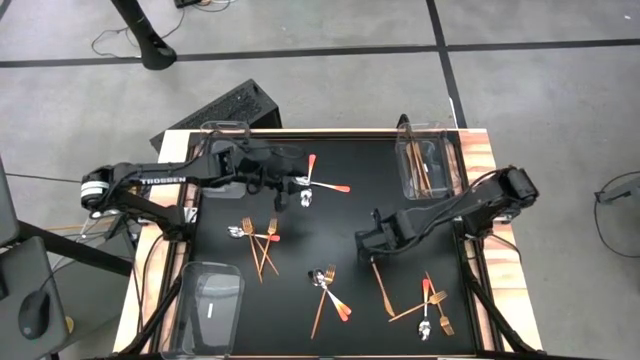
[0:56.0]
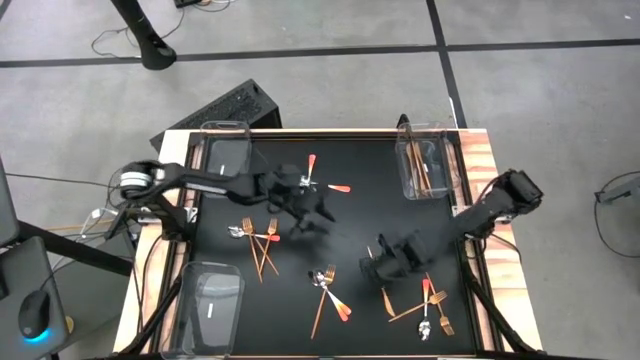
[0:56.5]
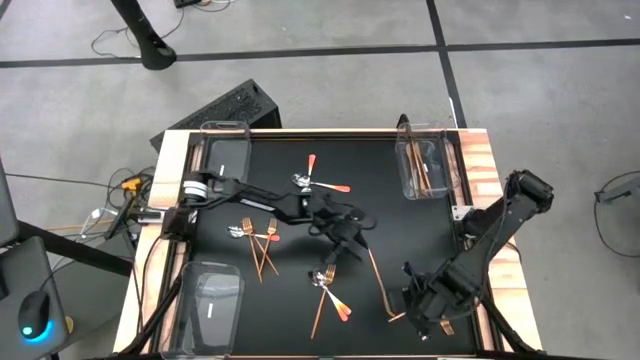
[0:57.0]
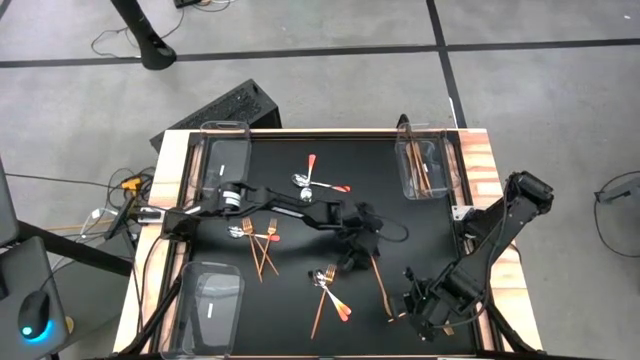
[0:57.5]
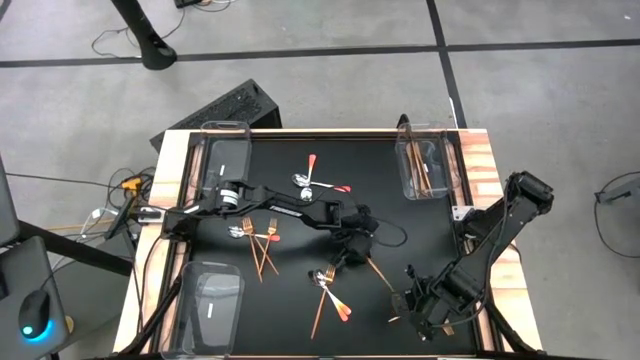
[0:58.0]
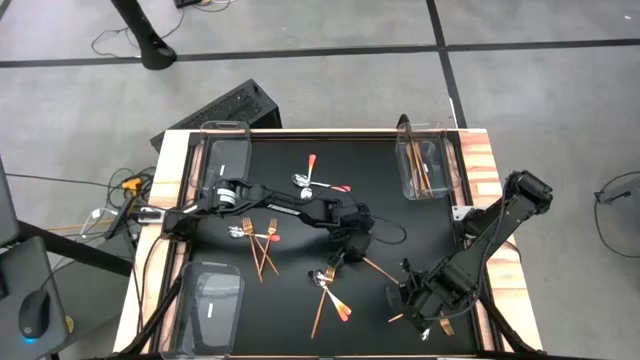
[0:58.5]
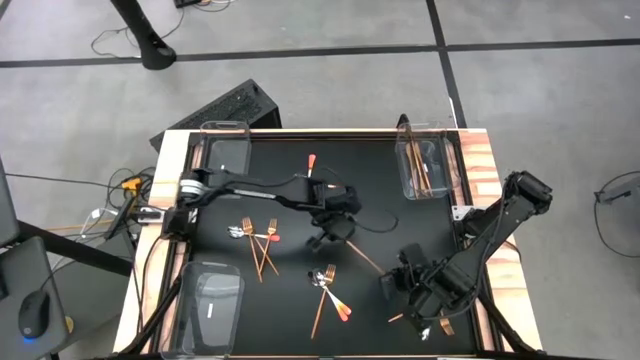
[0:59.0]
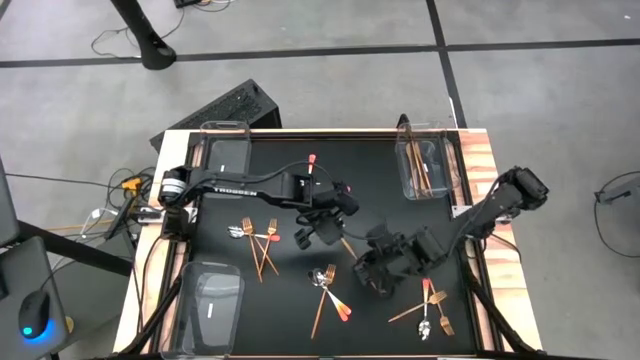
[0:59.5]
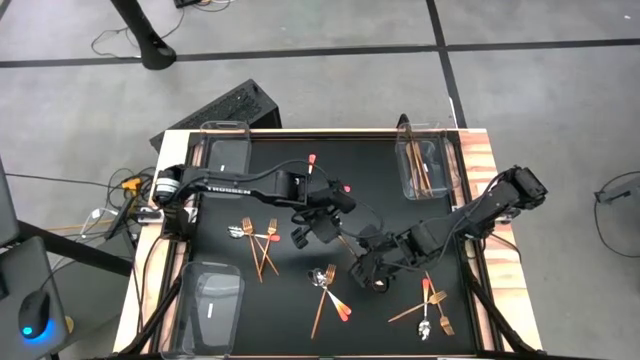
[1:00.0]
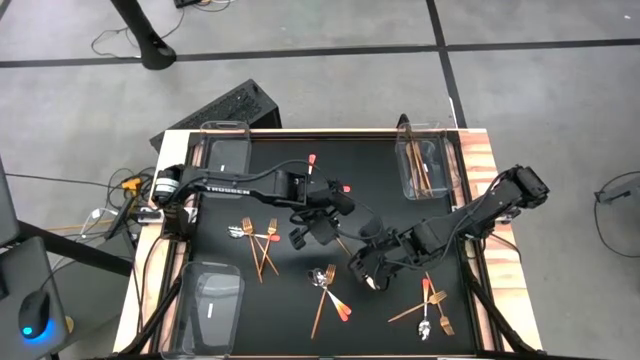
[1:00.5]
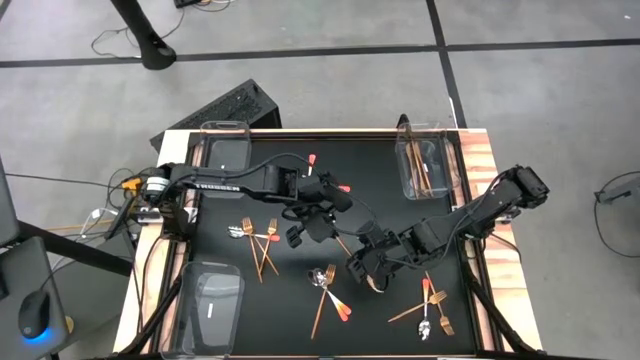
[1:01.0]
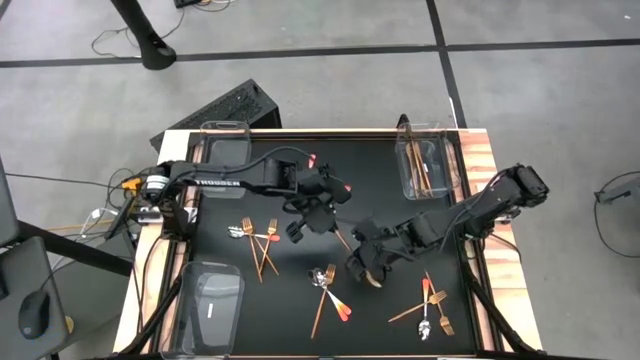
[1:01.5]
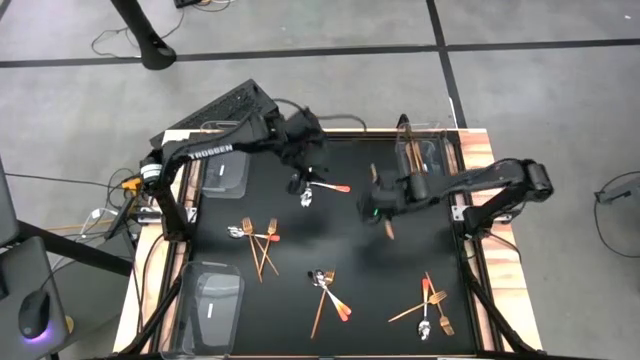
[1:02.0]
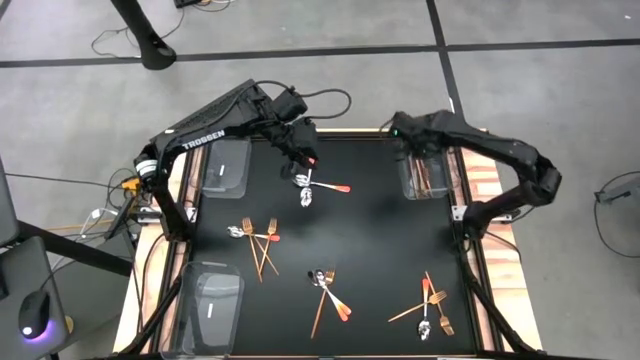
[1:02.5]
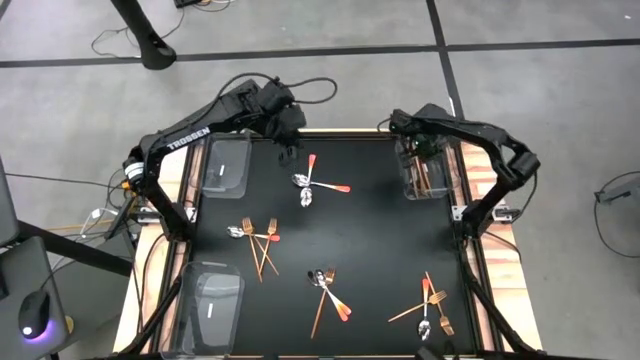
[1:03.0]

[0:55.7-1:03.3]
Task: Sort silverware by color (type)
Put the gold table knife into the top right transparent bin

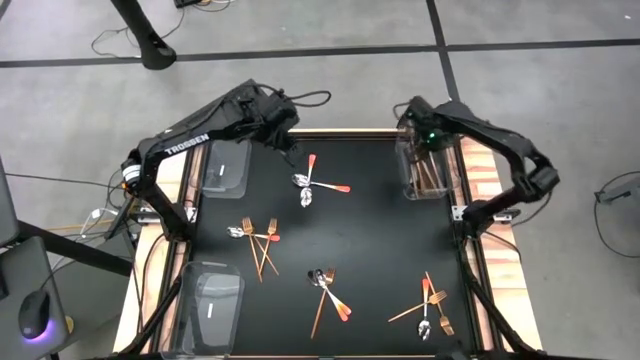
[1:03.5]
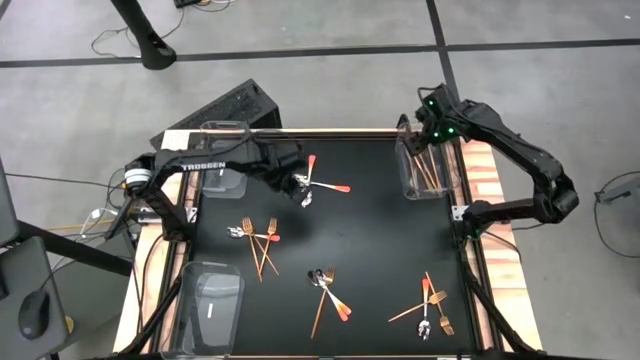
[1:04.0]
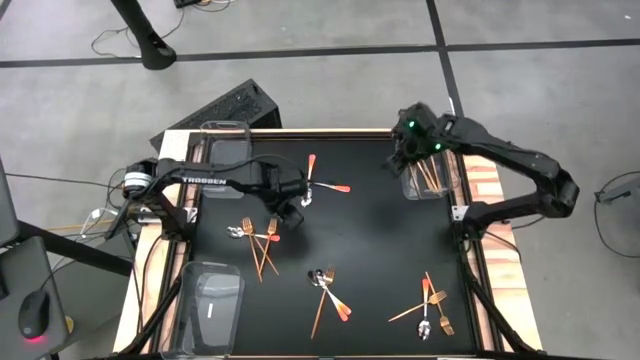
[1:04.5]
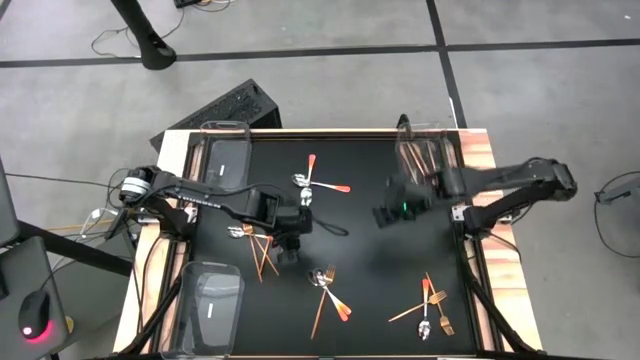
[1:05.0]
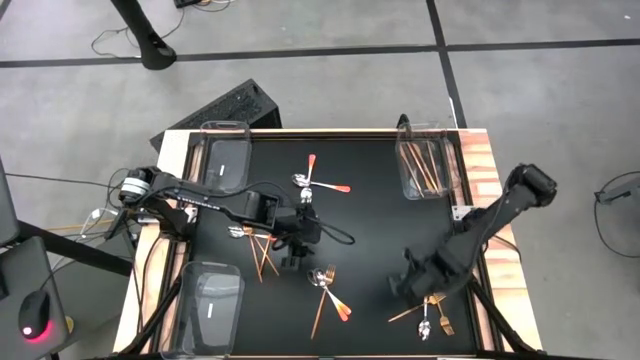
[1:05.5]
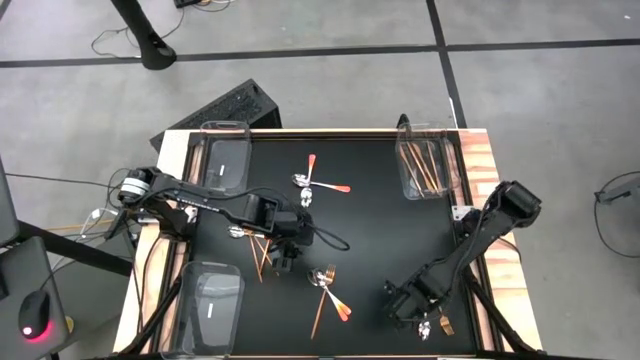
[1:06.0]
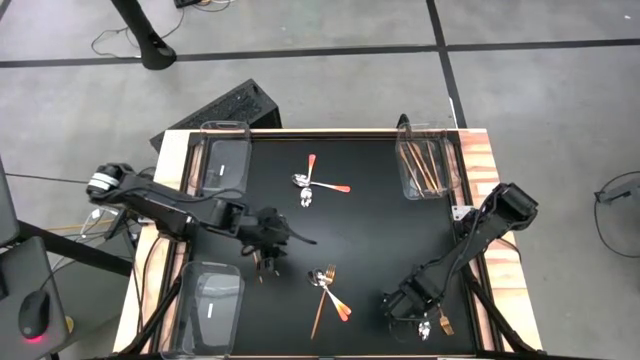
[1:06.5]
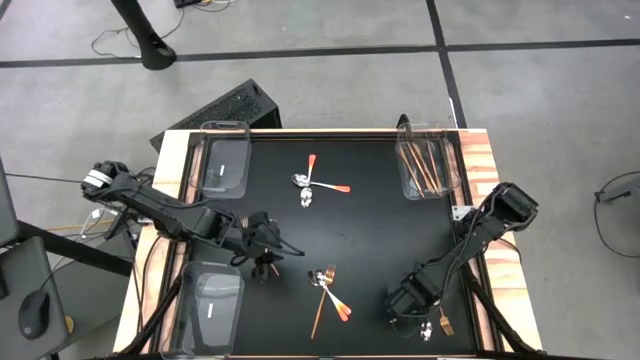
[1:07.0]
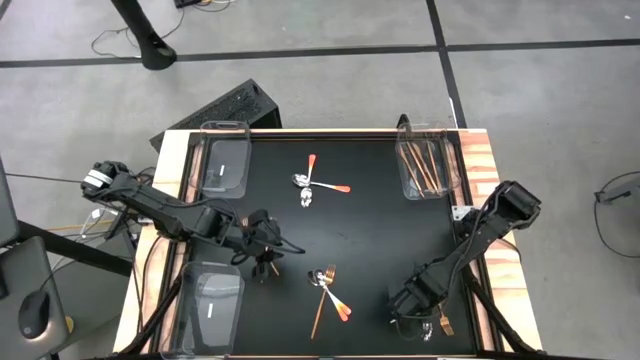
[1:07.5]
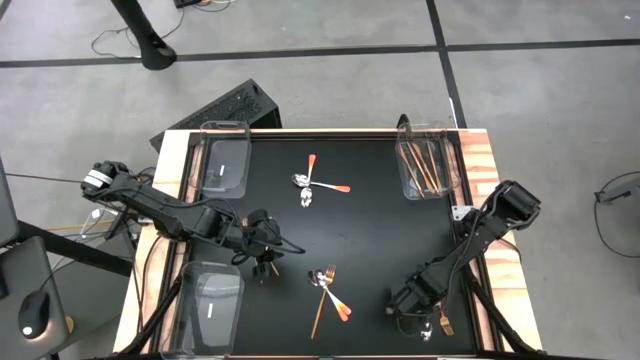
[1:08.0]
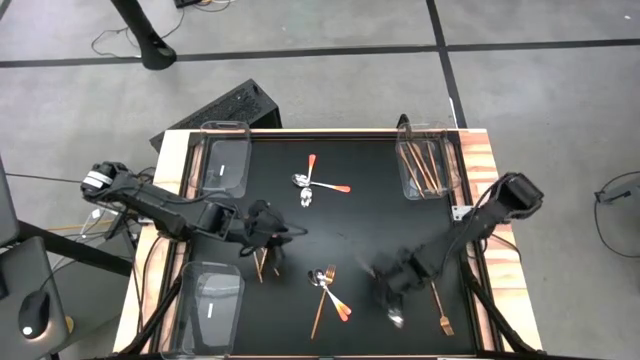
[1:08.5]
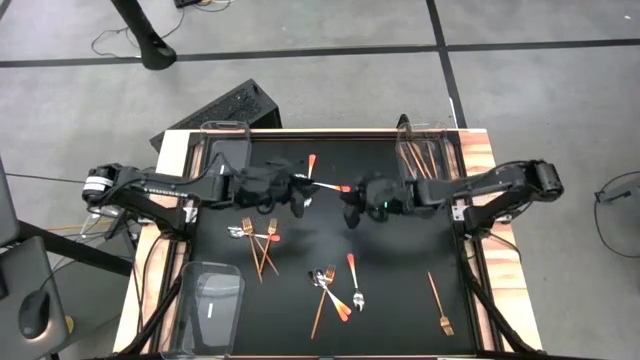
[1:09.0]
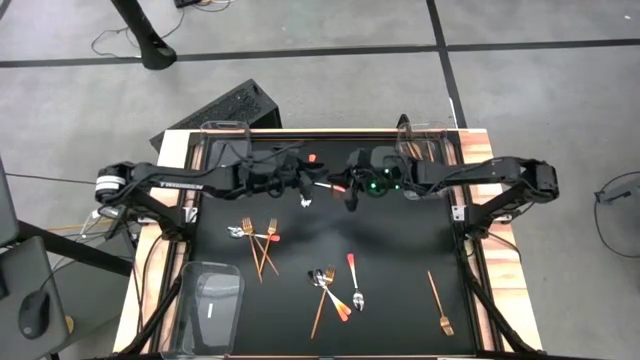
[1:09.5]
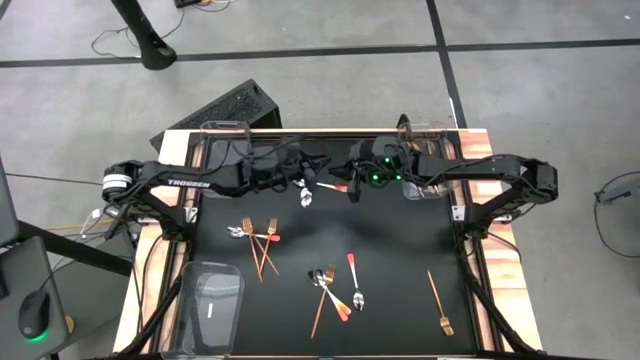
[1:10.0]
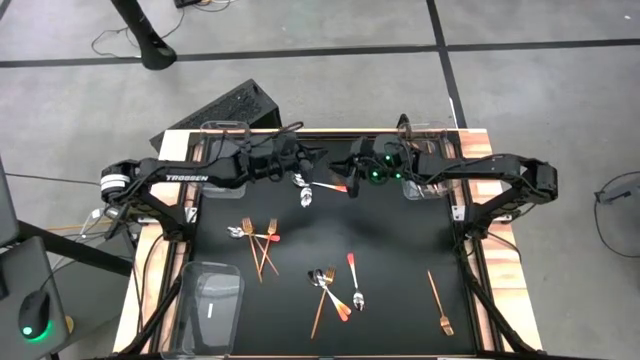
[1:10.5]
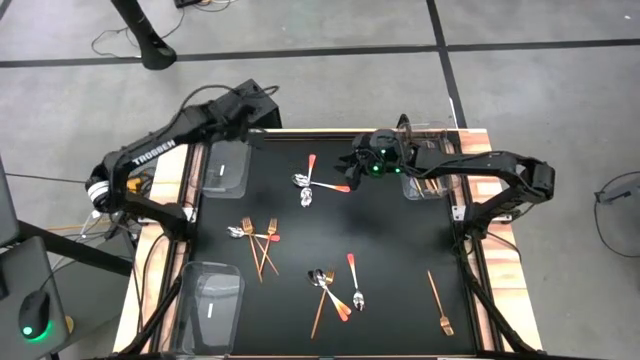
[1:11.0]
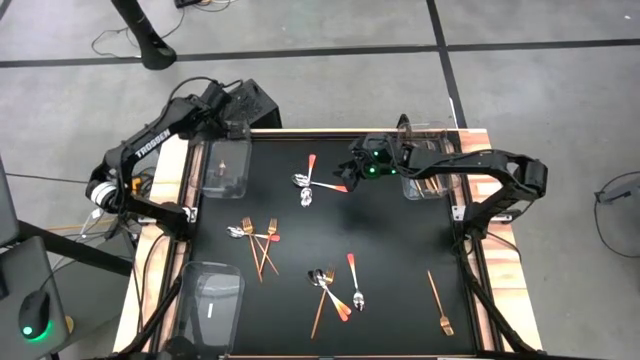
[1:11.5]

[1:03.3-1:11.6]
Put the gold fork into the top left transparent bin

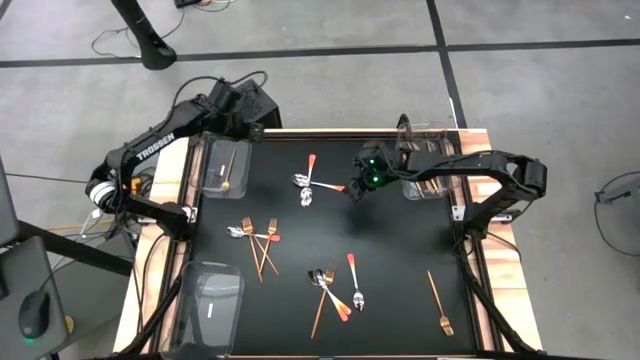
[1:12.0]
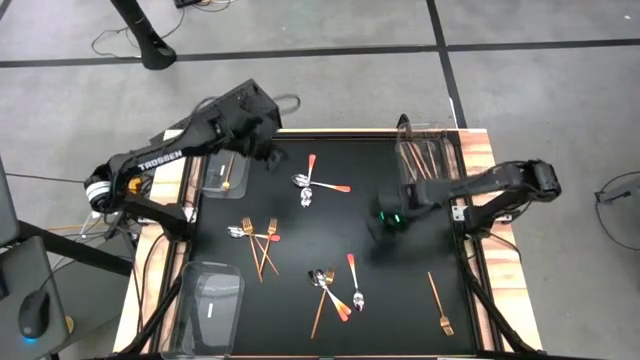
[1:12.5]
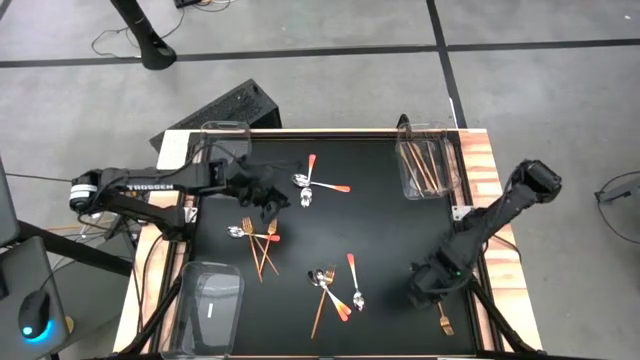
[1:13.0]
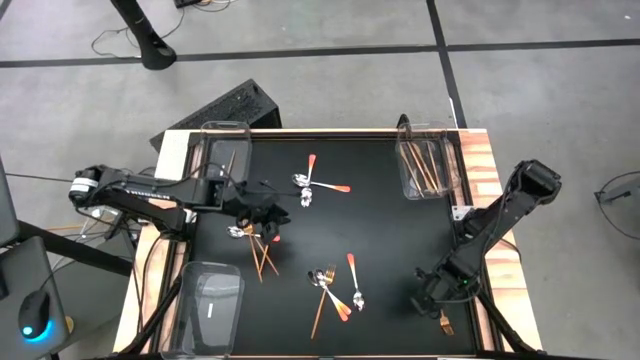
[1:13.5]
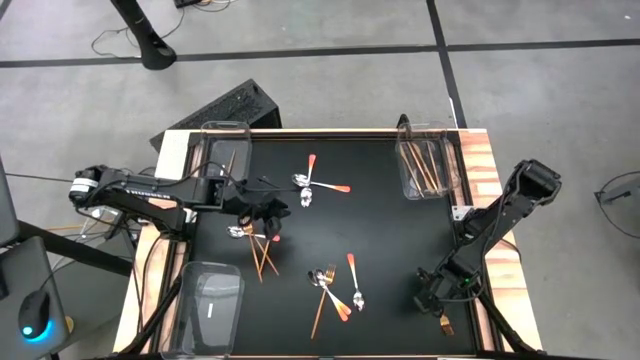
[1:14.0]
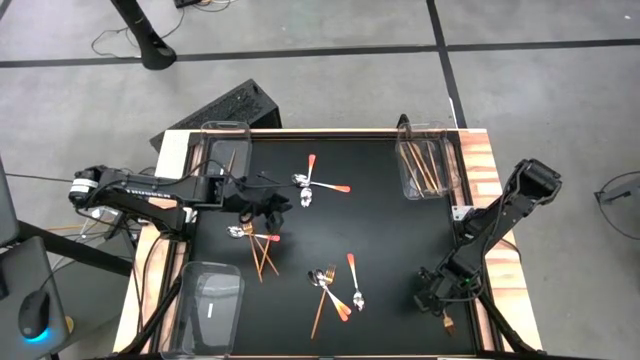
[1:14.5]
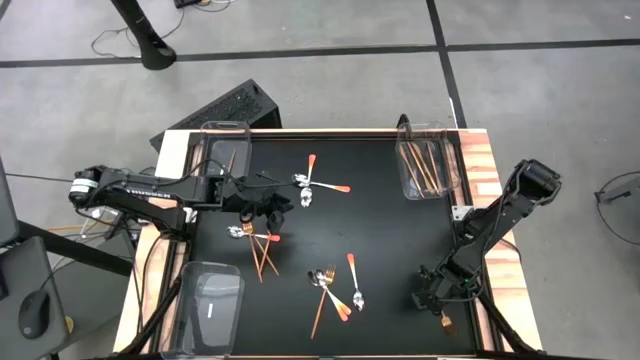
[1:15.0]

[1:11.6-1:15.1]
Put the gold fork into the top left transparent bin

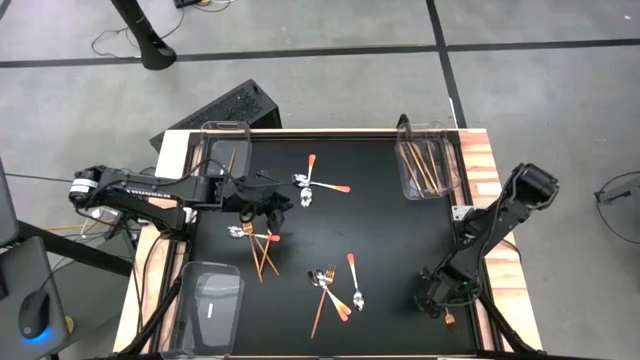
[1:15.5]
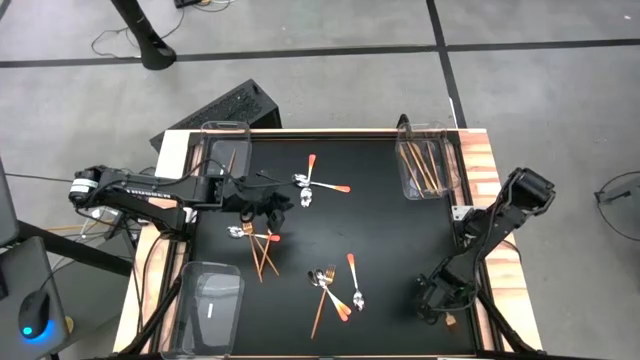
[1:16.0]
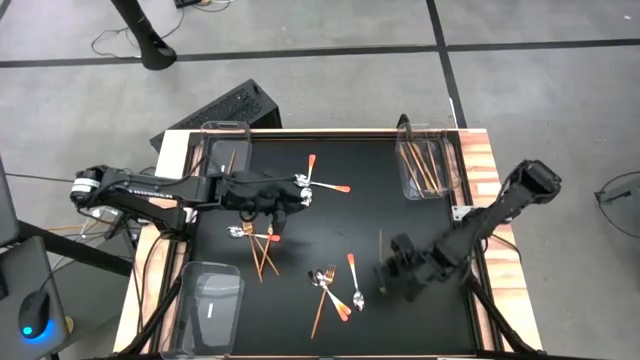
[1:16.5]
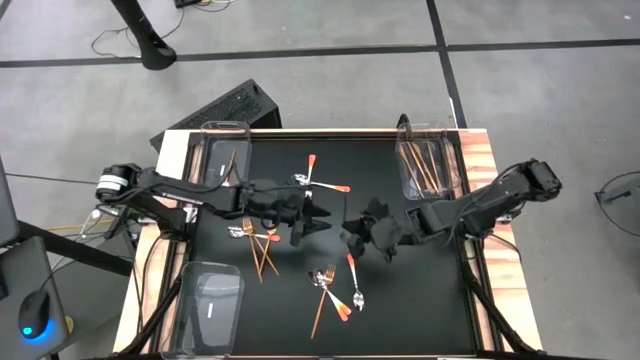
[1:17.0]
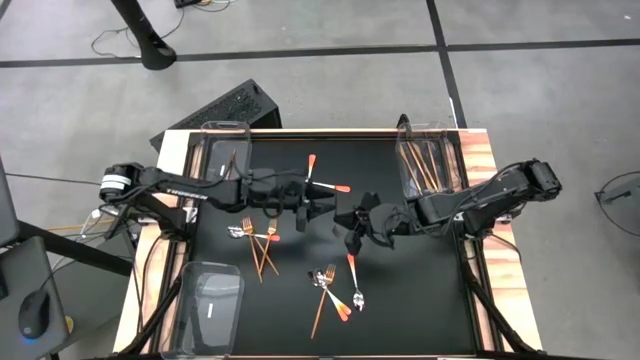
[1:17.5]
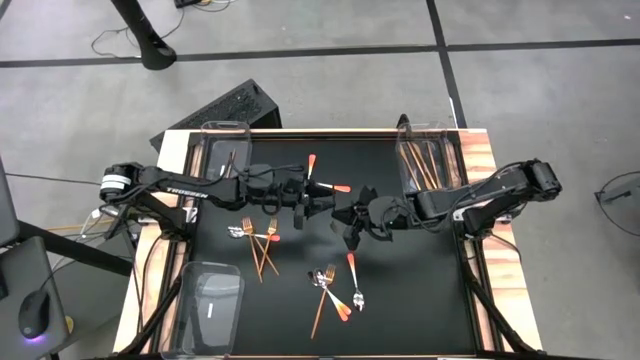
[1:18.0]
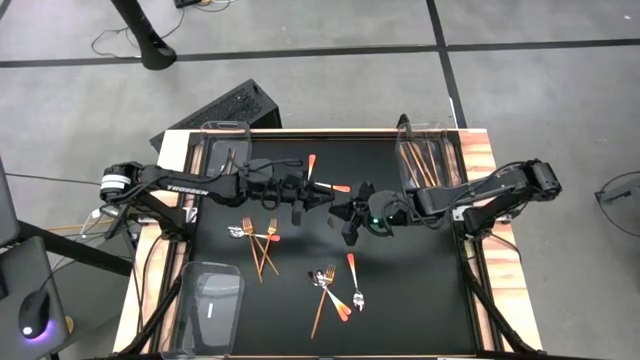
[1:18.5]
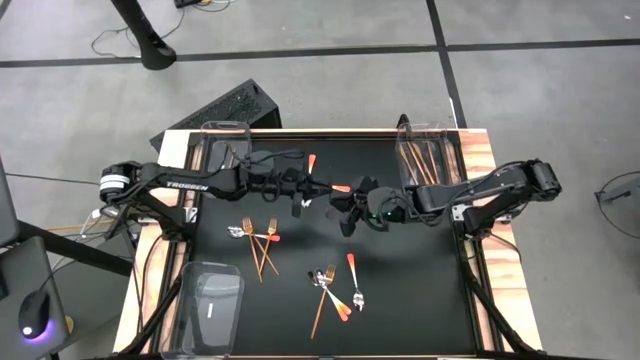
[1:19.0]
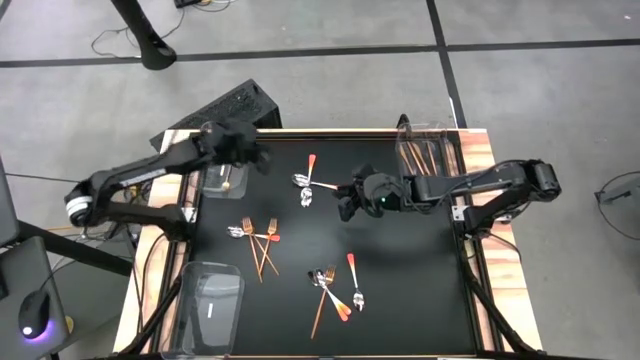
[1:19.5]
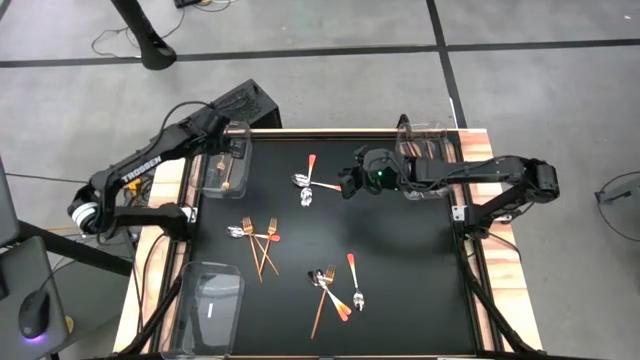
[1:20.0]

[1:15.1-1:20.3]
Put the gold fork into the top left transparent bin
